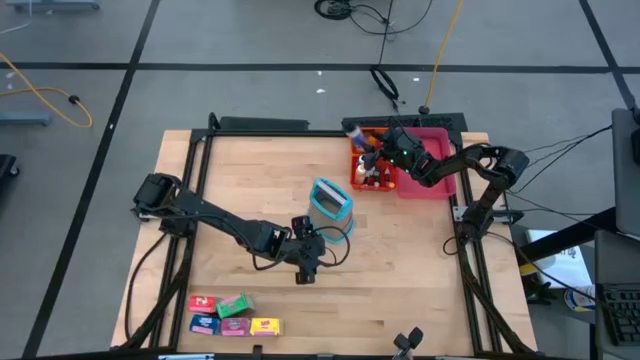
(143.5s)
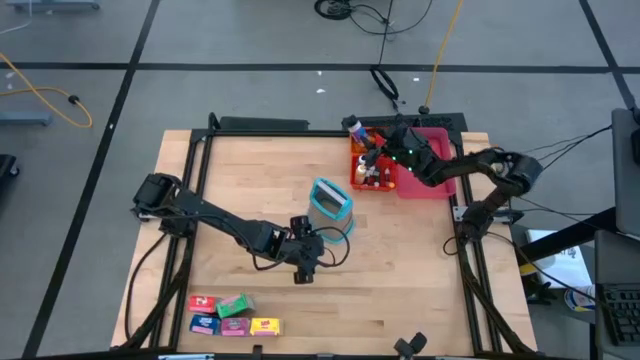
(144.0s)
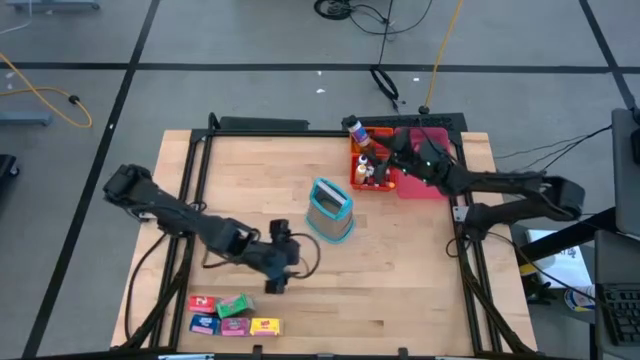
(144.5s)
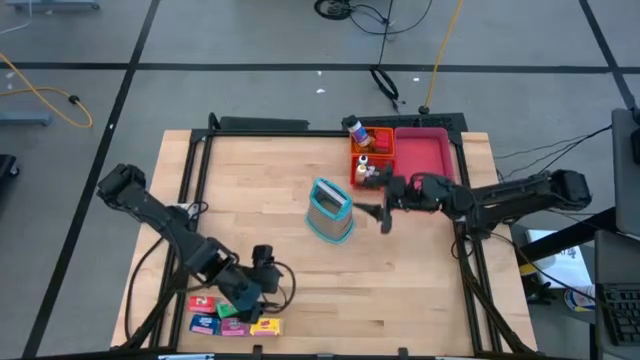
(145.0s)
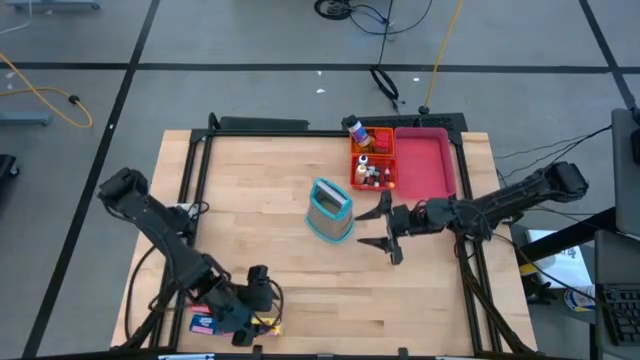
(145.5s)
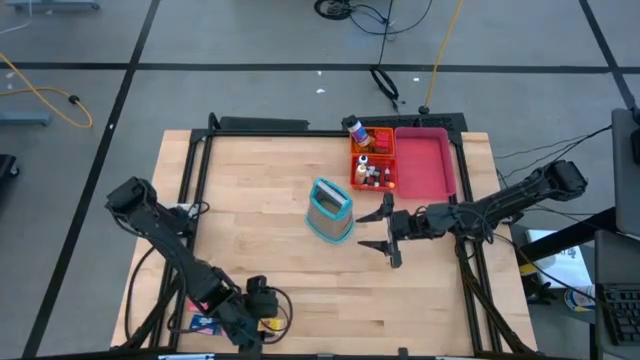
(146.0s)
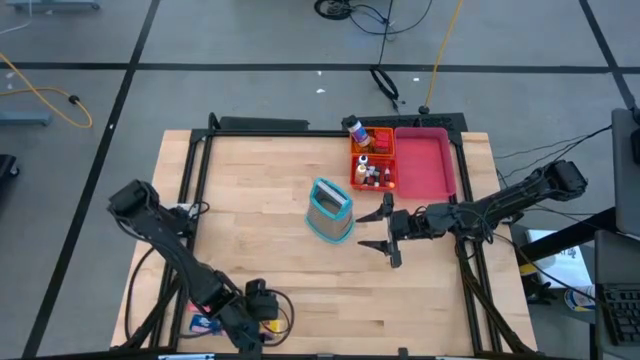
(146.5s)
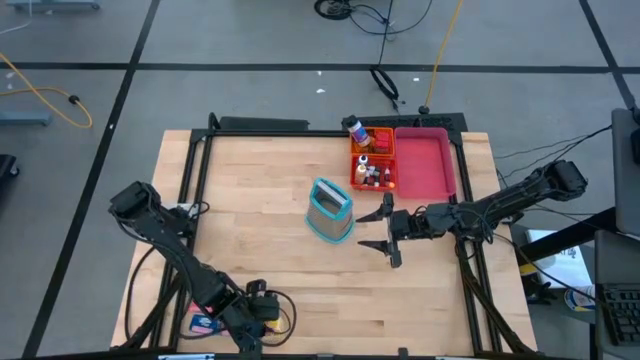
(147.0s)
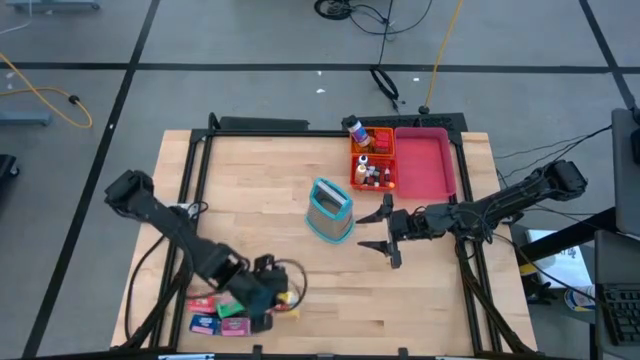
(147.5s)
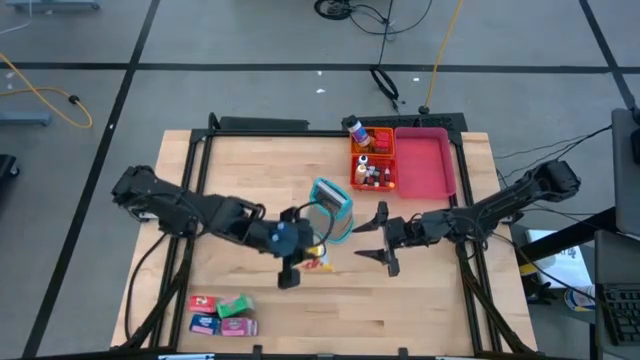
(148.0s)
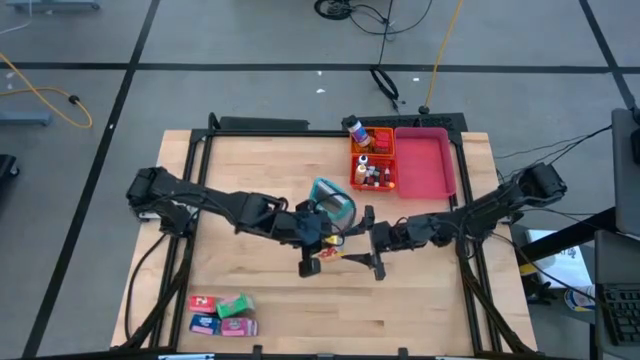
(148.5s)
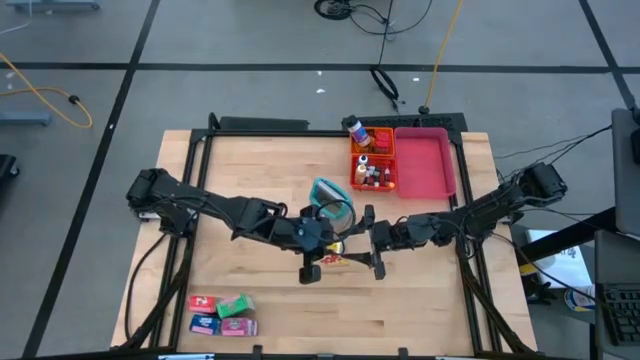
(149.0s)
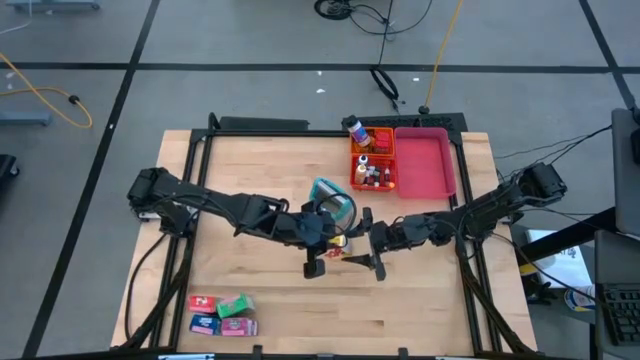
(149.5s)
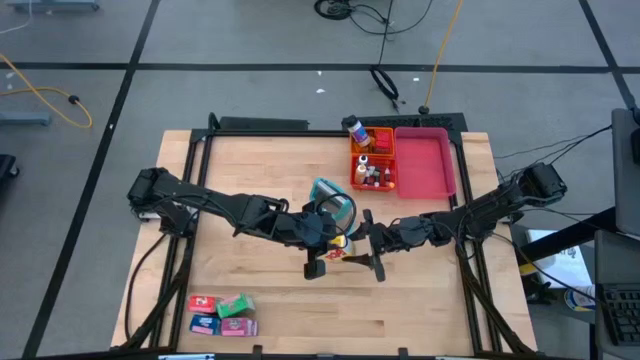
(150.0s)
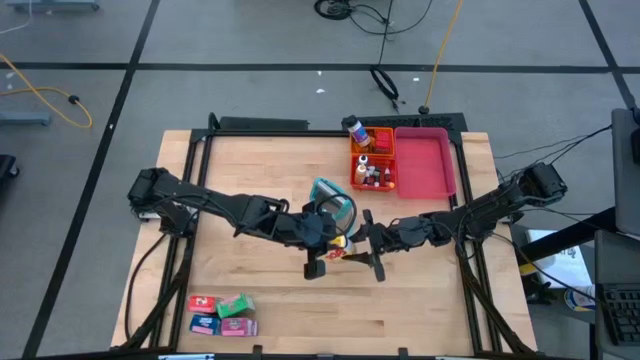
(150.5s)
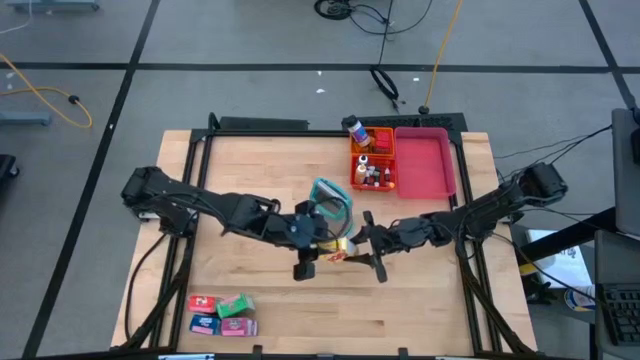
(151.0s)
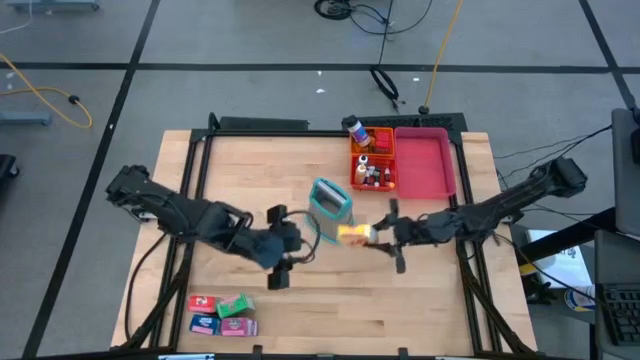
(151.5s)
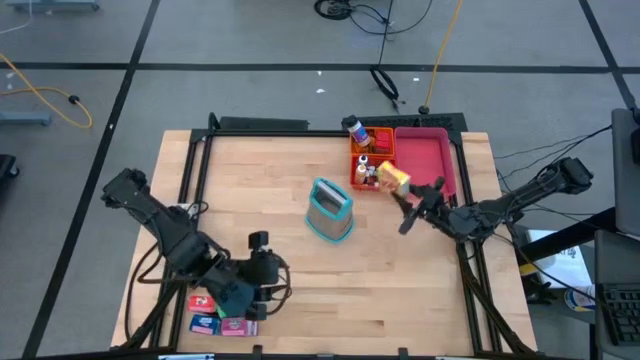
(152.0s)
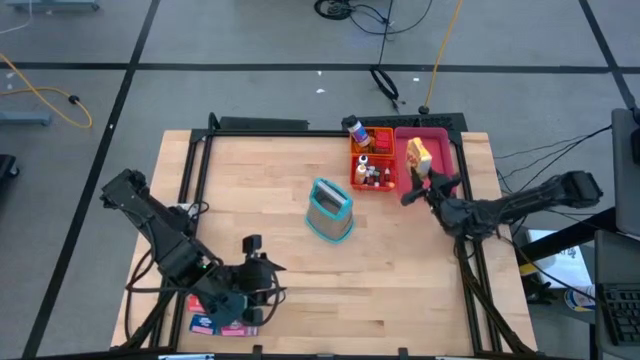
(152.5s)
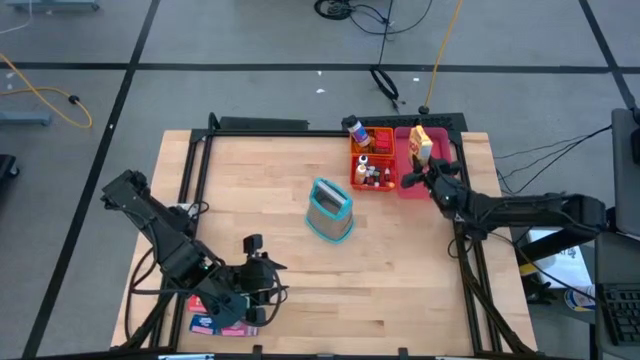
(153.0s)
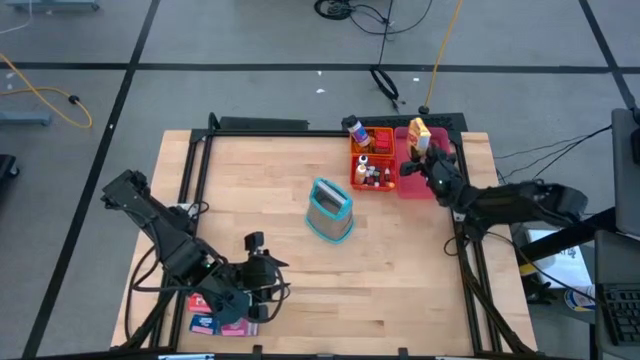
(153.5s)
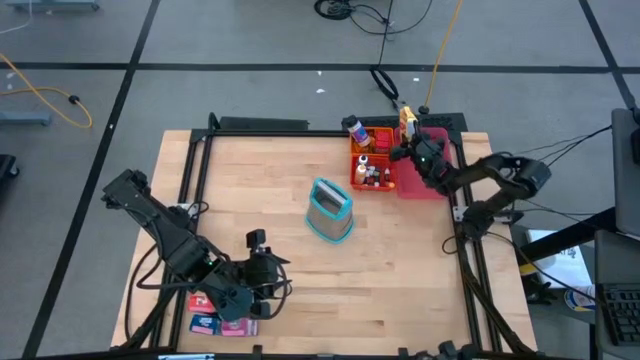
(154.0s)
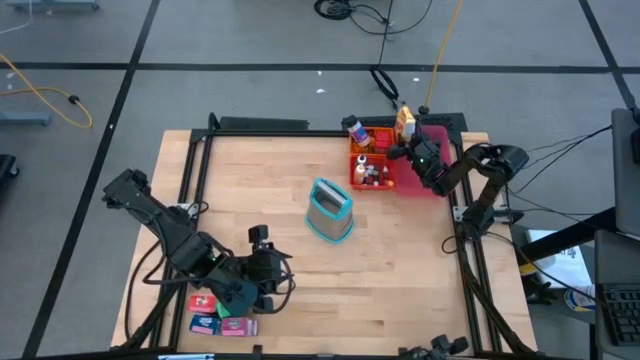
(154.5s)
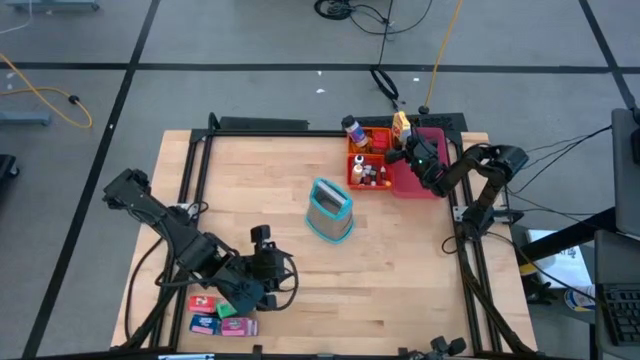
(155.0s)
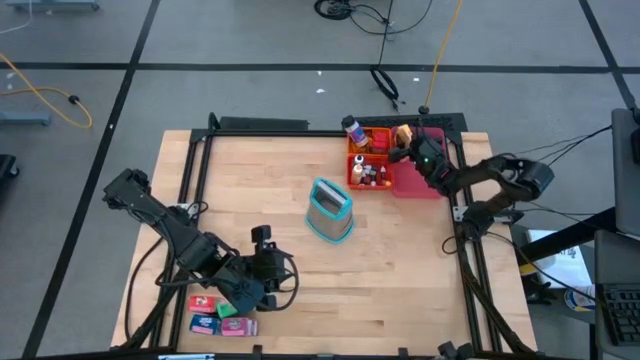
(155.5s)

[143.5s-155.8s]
Task: Pick & Place Kitchen Items
Put the yellow cereal box into the red bin
